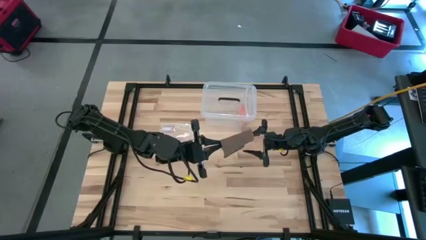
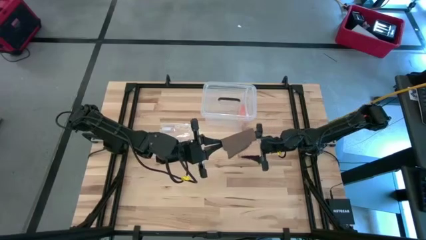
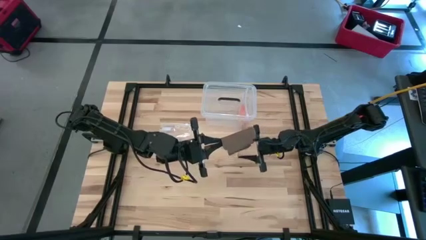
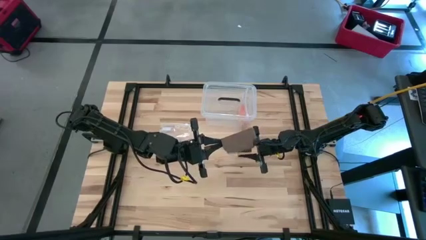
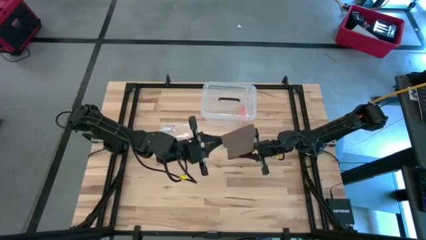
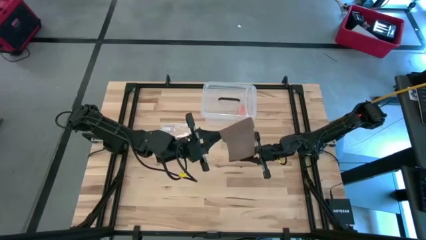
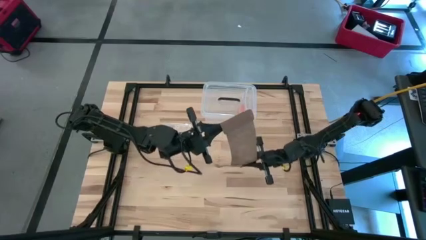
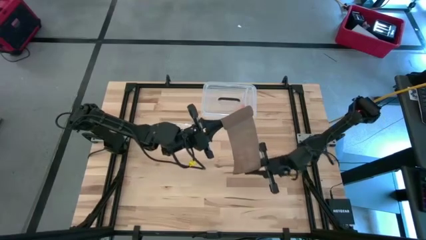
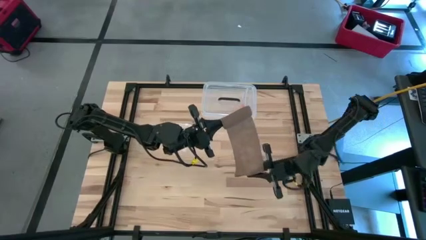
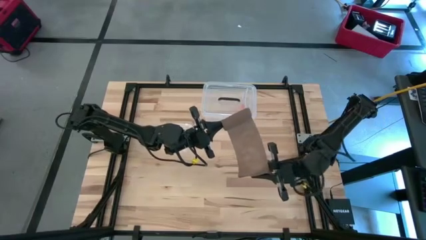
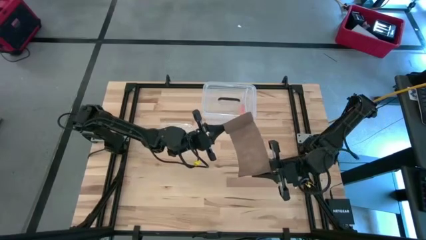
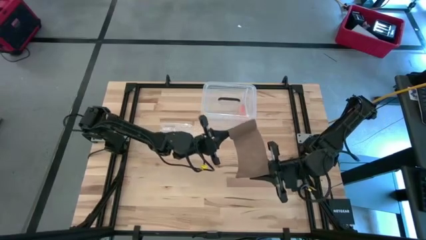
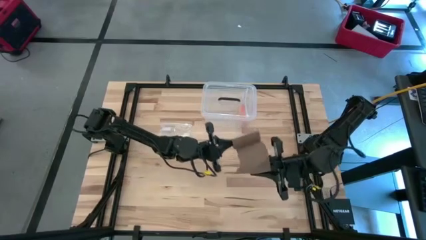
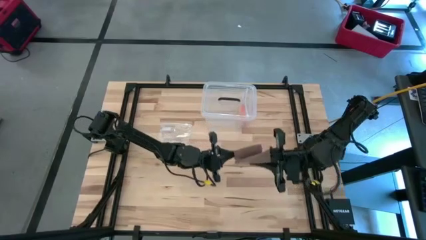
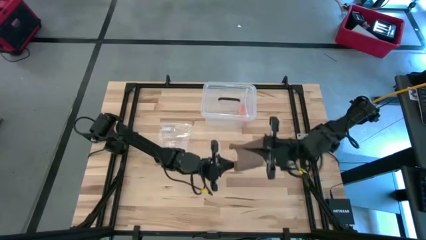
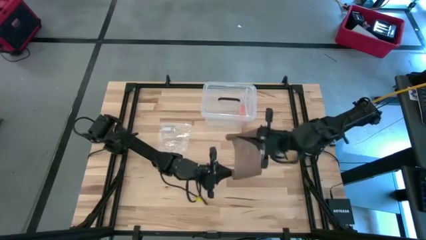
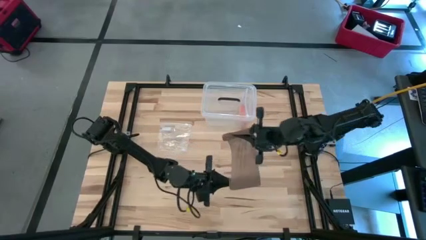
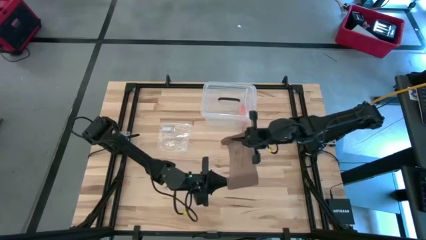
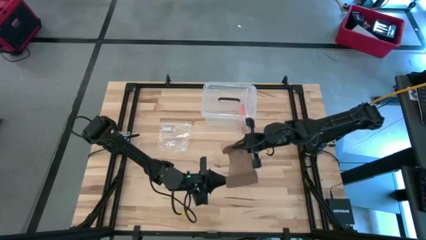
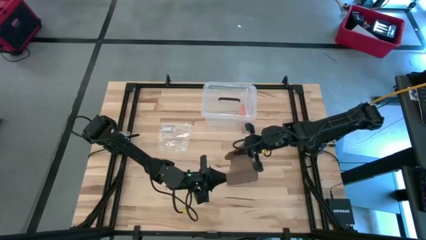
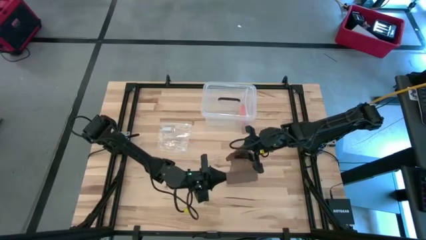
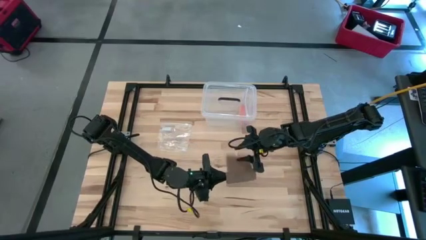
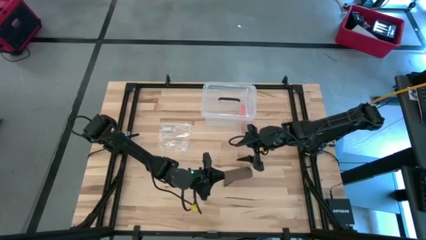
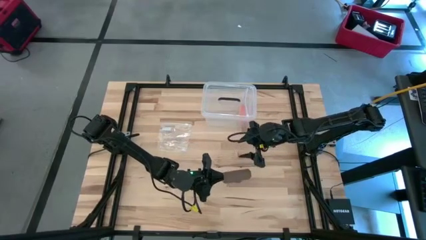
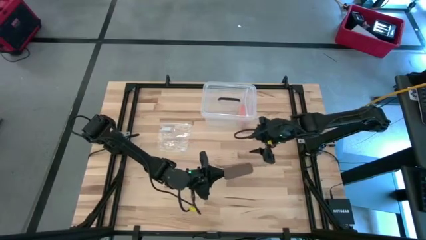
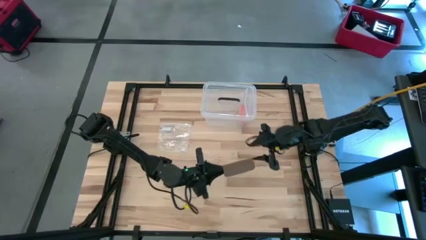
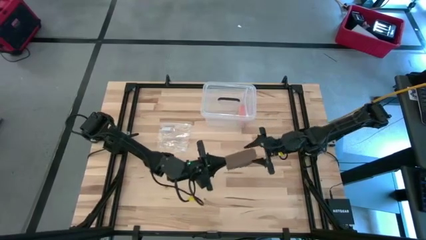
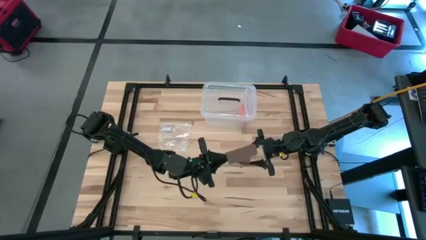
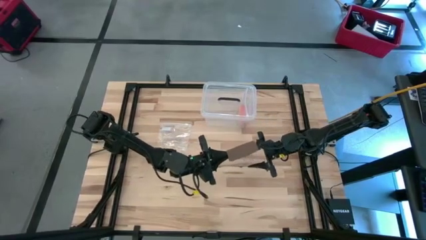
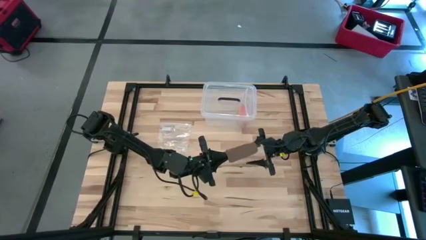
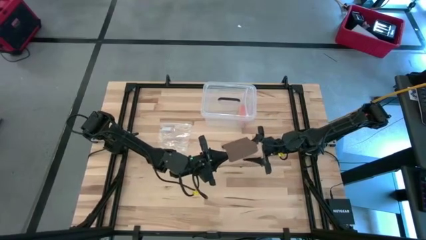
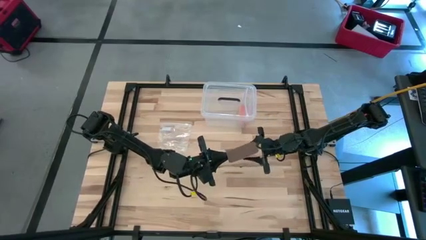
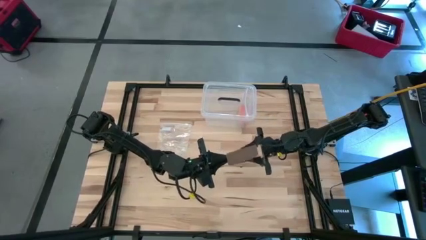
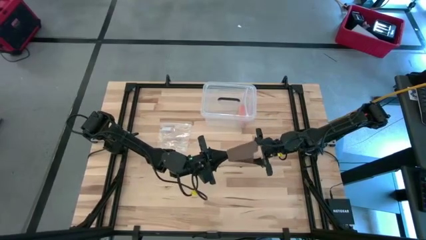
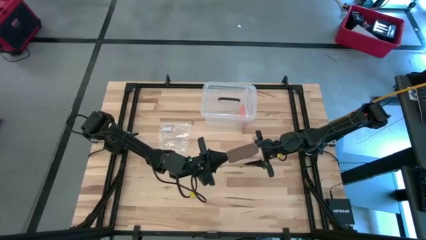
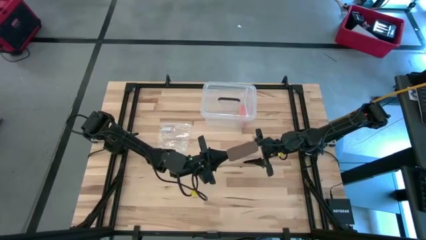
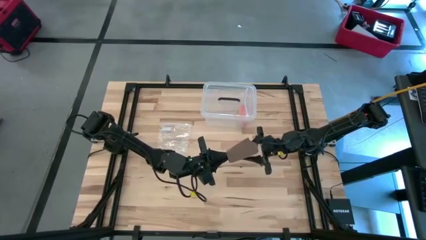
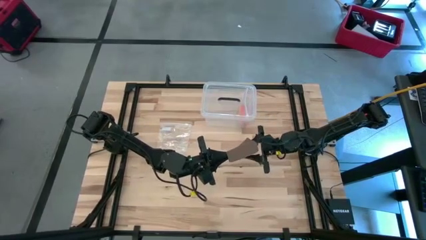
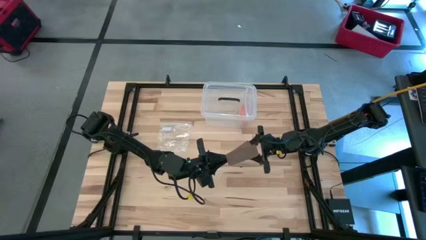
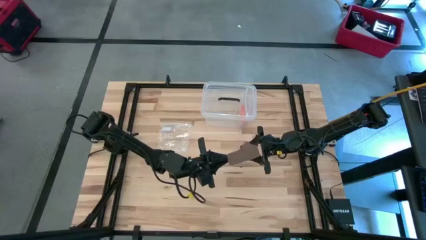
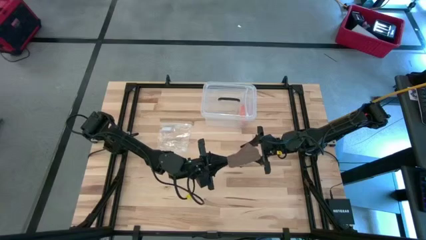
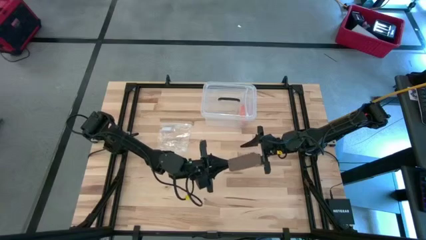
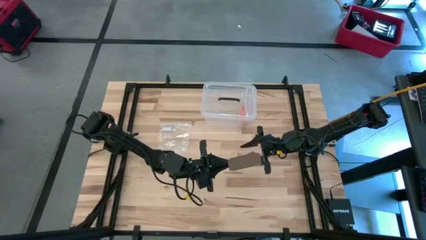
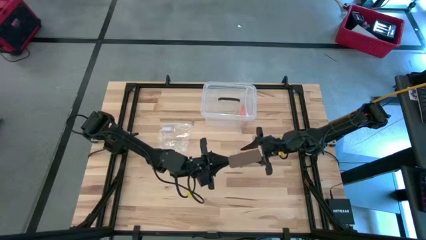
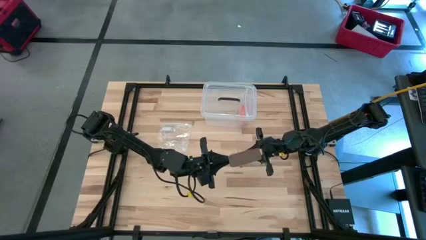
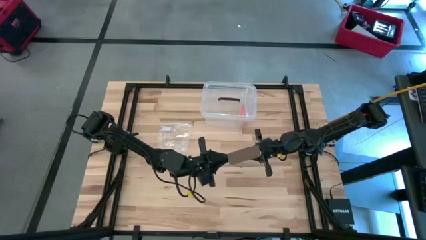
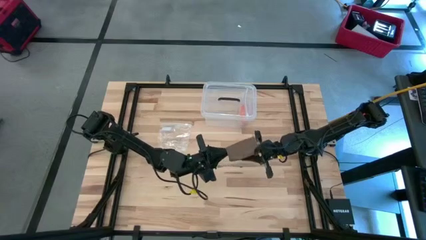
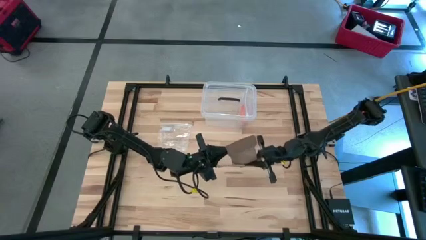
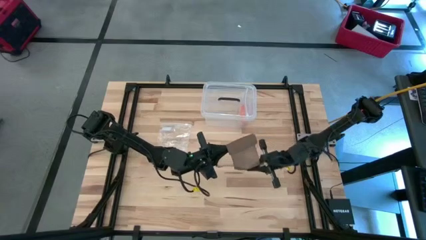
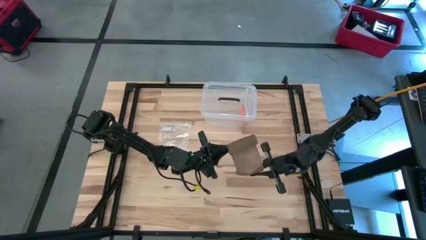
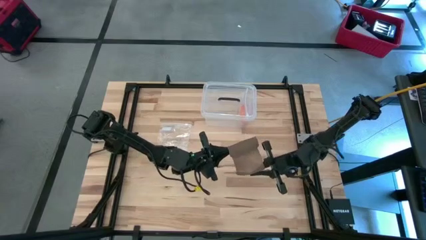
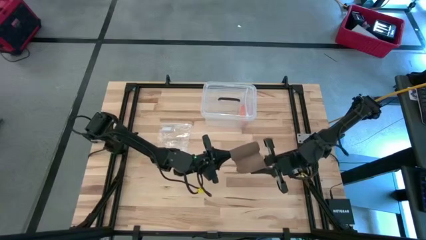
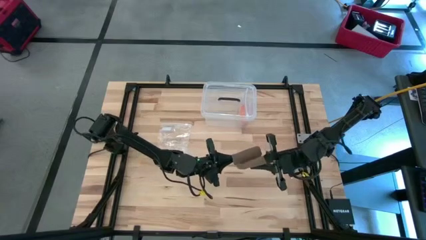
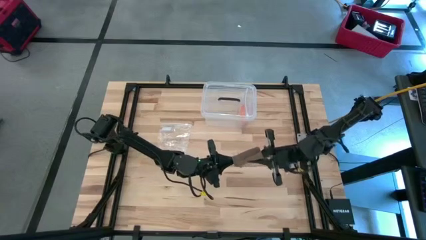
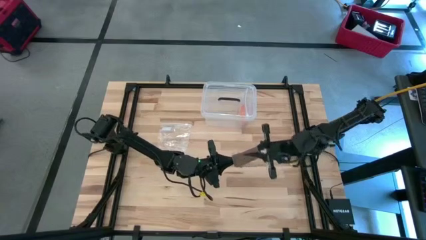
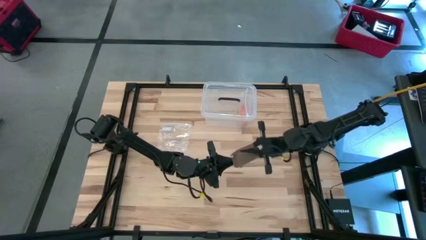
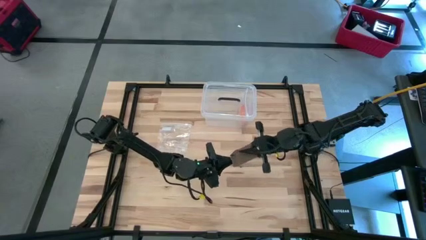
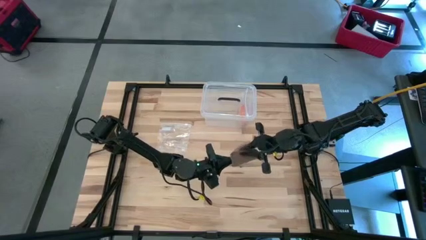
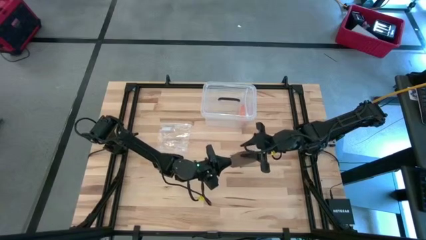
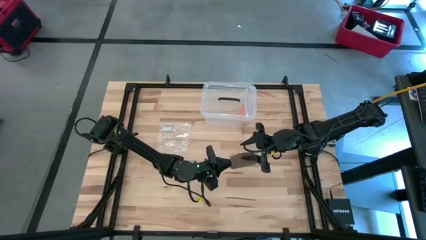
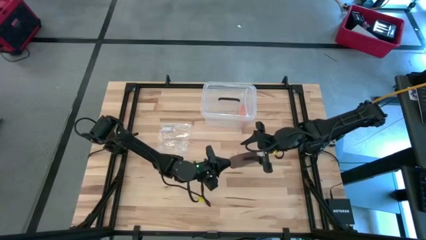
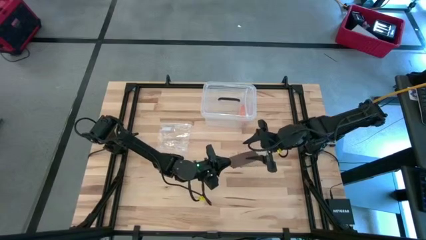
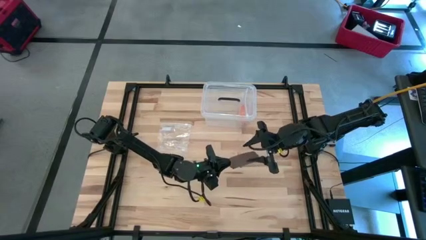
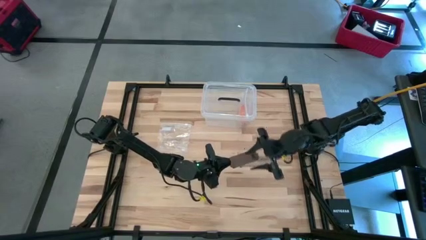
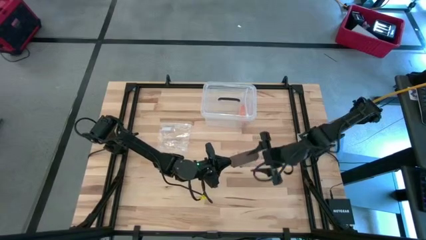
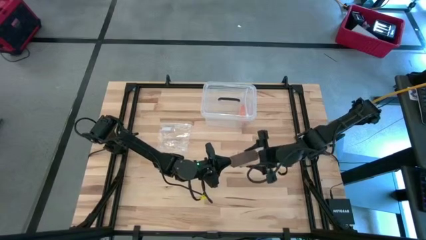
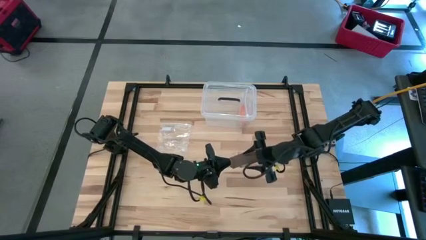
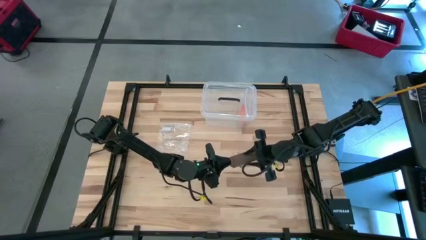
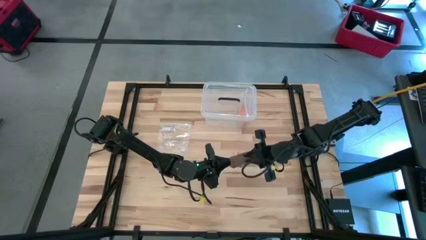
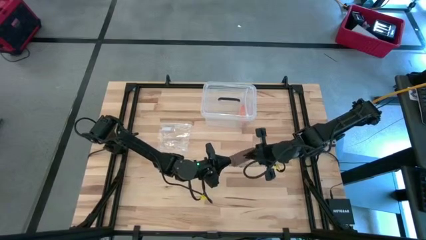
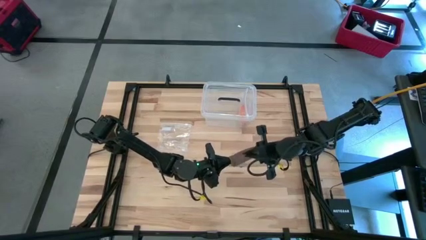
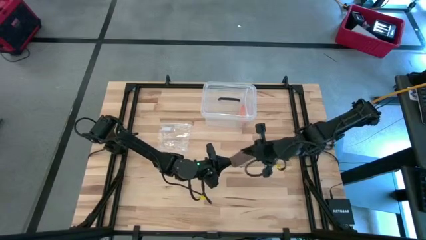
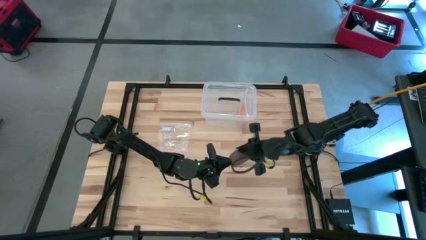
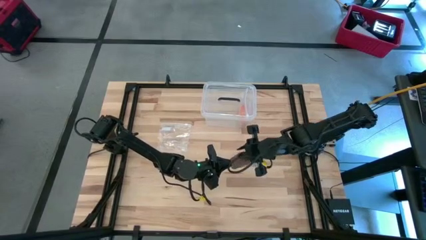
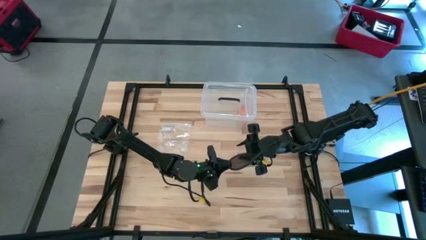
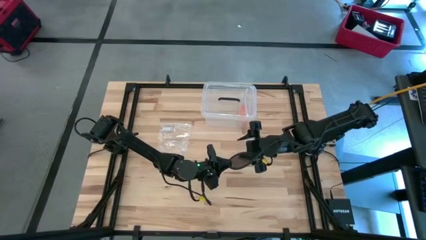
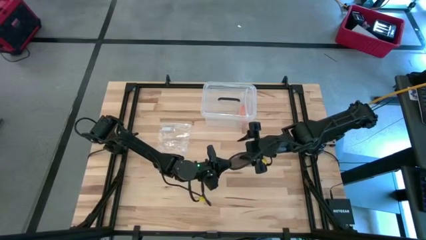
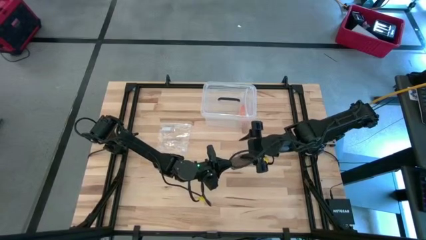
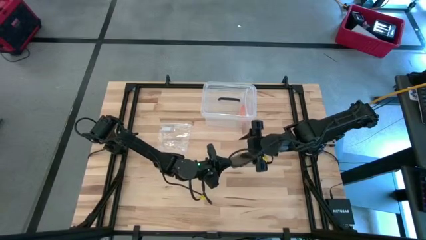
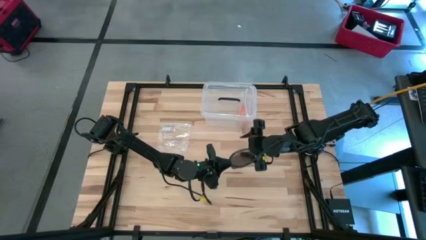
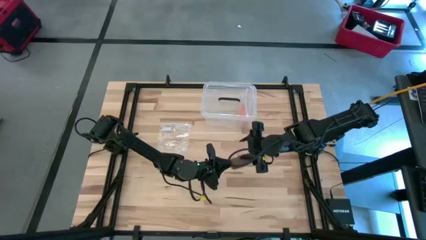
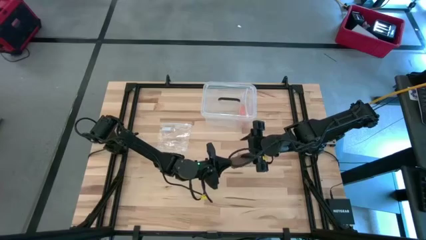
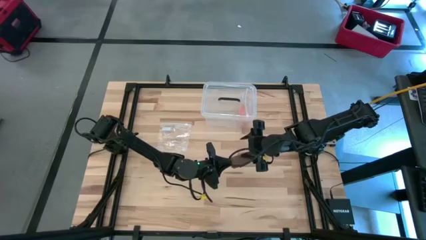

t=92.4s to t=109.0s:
Task: Roll bandage
Roll the brown bandage

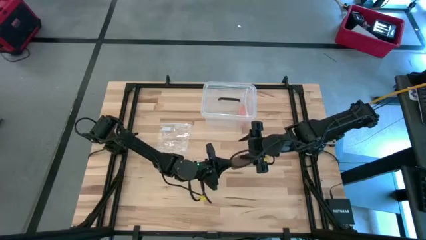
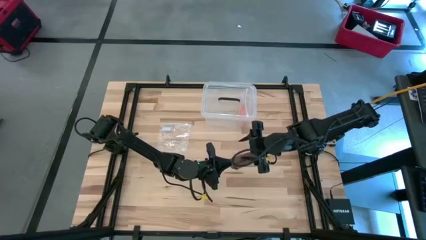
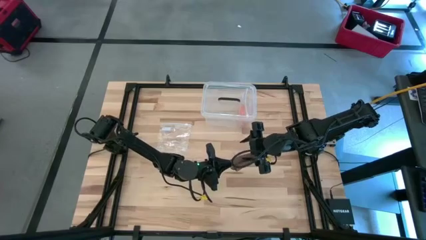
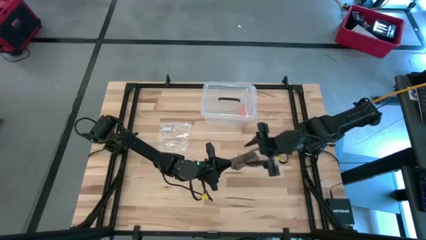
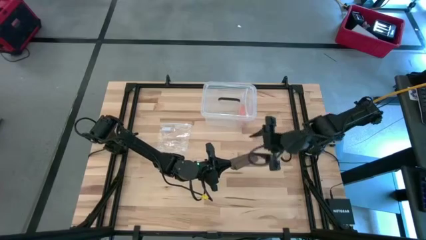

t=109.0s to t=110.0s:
Roll the brown bandage
